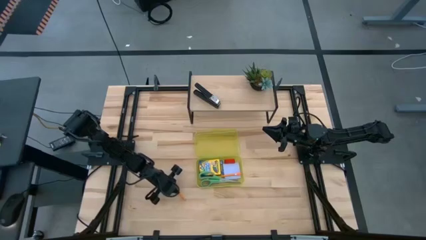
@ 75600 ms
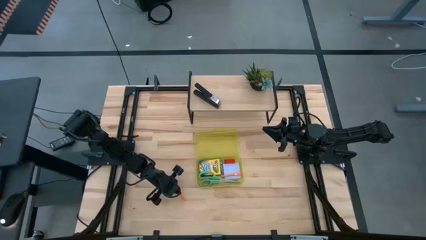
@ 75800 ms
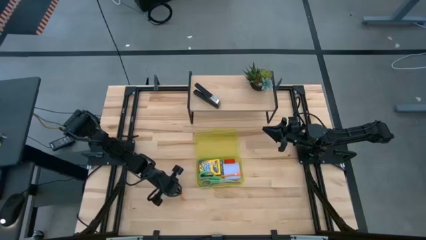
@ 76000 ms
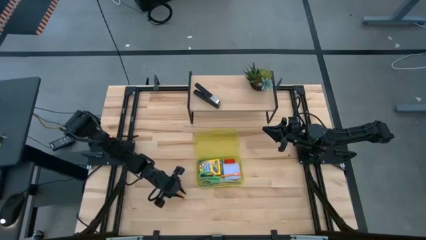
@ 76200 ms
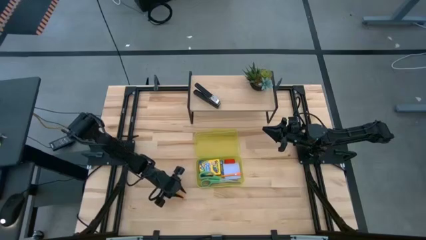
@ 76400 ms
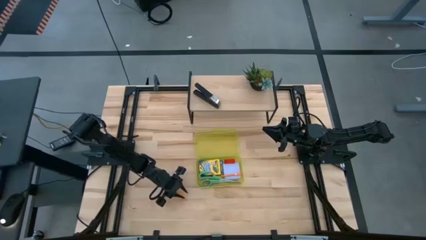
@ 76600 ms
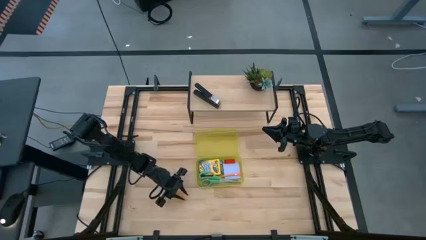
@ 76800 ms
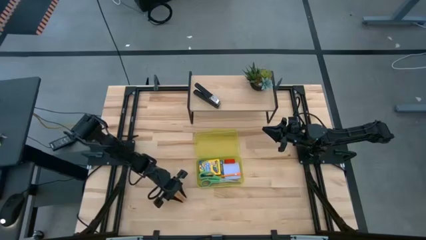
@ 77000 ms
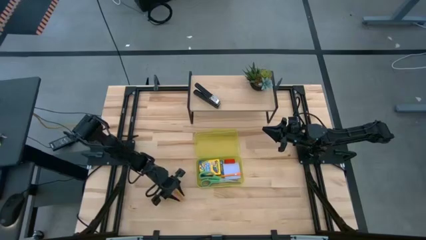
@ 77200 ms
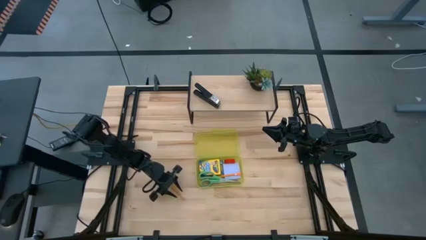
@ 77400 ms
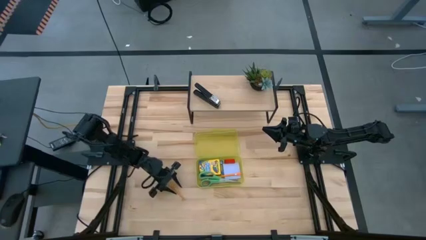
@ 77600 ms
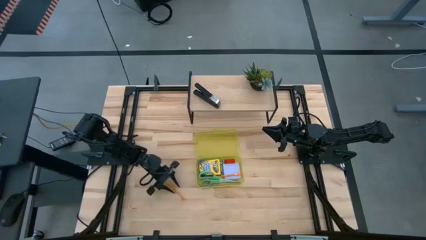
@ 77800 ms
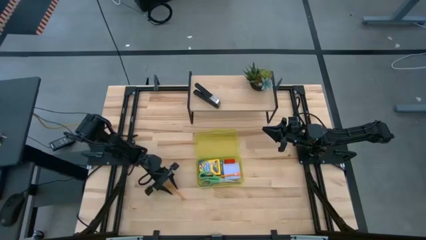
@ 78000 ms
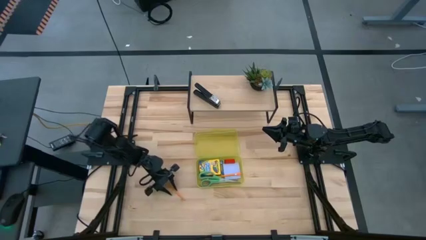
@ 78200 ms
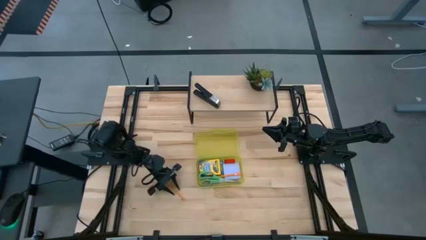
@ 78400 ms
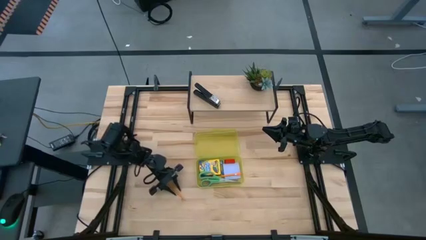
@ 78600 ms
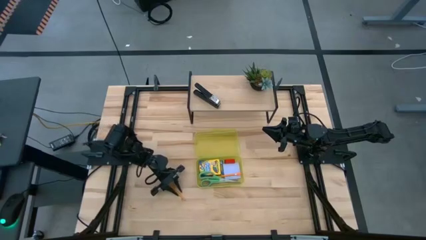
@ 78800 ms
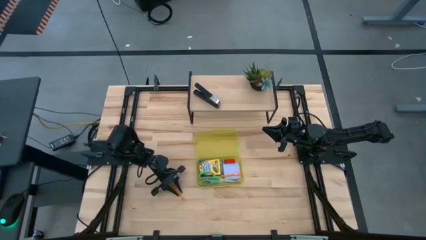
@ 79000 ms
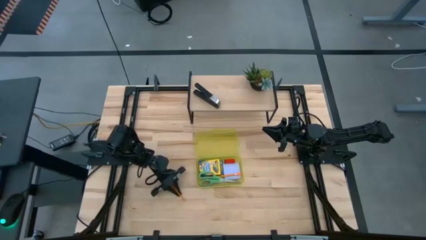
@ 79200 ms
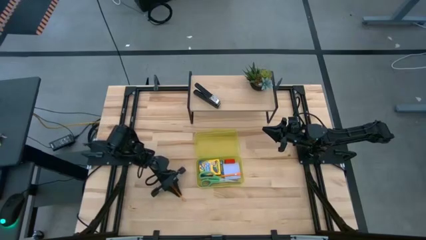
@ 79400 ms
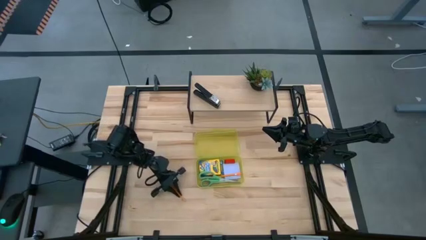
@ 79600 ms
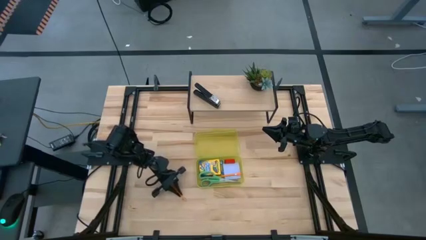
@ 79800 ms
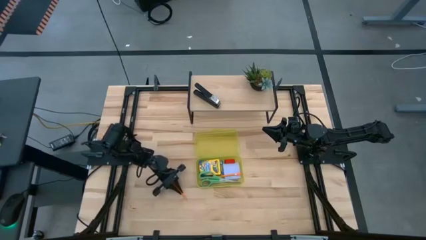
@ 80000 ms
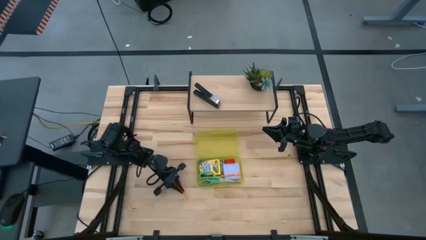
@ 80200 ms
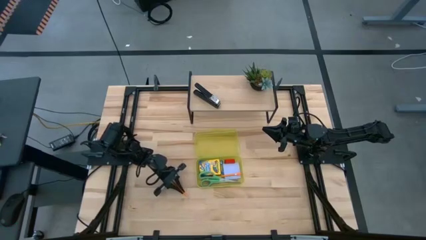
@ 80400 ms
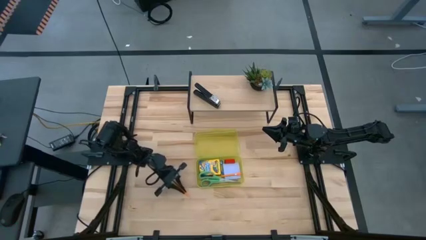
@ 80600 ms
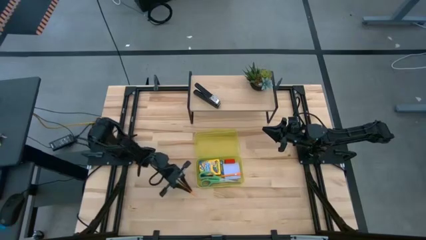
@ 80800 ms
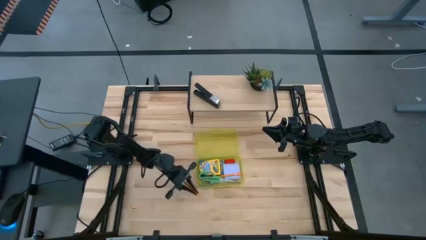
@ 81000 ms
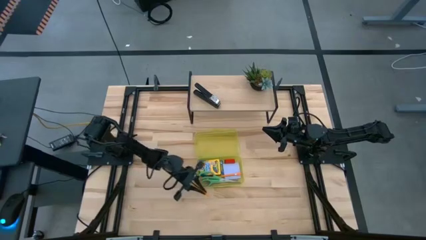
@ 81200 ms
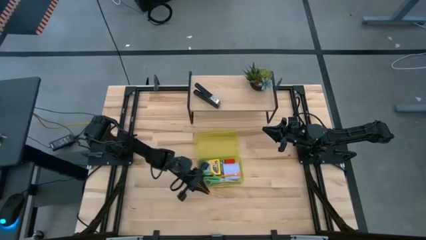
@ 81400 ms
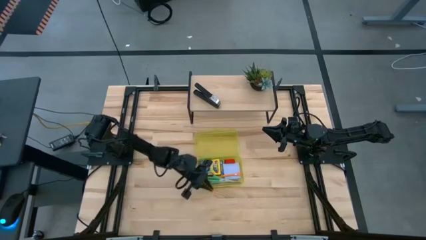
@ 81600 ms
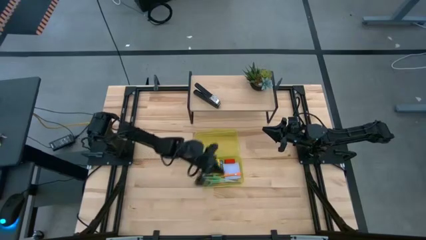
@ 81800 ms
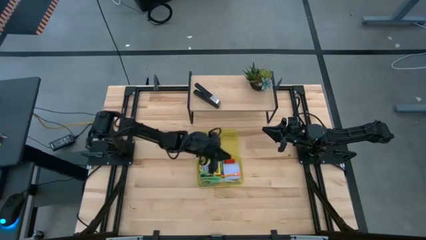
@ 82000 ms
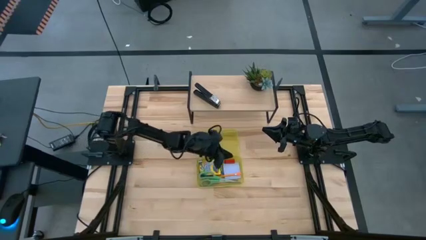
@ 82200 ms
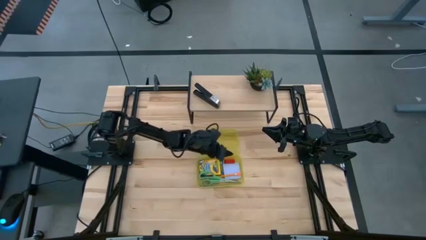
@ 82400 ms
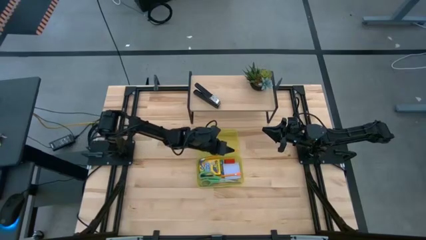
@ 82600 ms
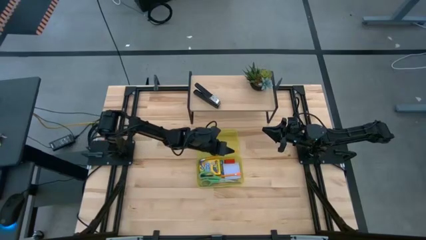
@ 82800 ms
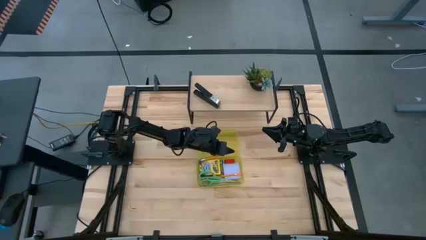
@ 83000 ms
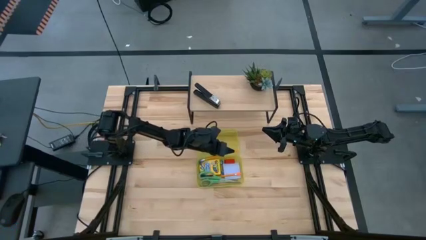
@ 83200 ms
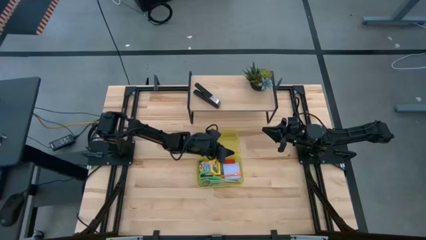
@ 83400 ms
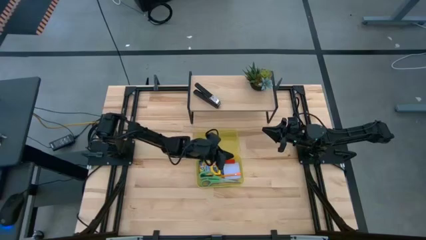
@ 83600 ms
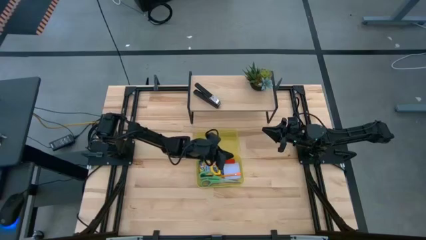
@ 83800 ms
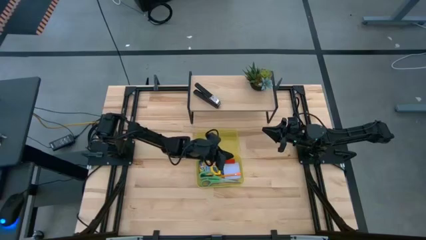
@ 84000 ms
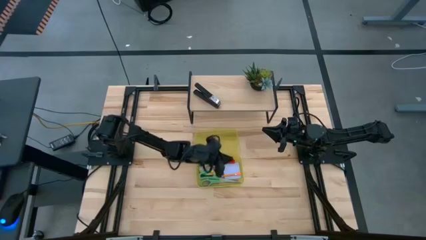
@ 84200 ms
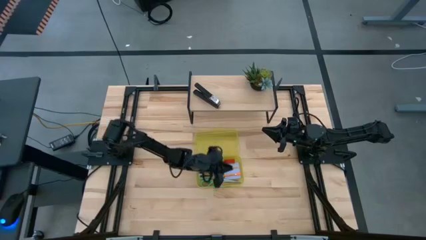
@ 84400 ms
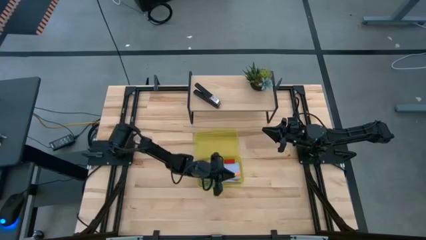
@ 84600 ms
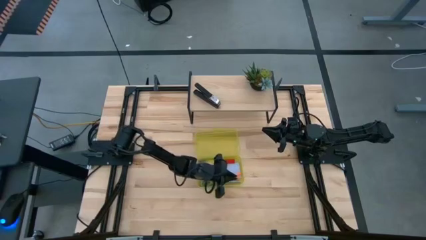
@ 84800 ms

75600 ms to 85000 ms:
Task: Pack school essentials
Put the yellow pencil into the yellow supply box

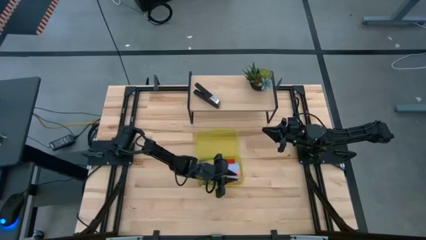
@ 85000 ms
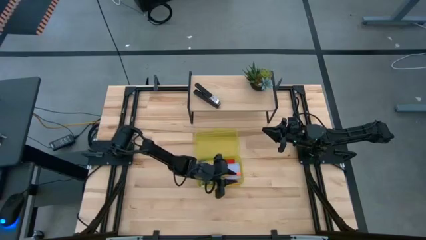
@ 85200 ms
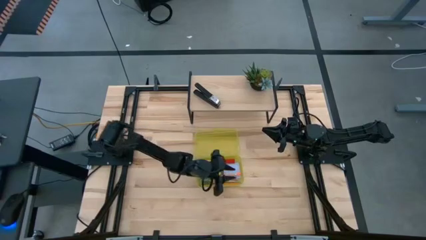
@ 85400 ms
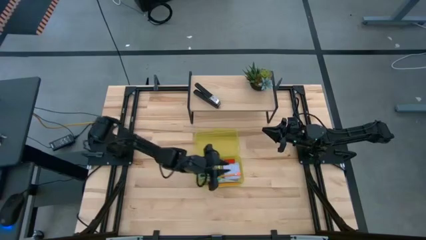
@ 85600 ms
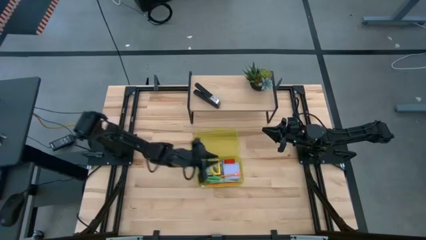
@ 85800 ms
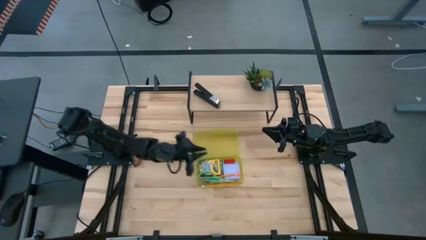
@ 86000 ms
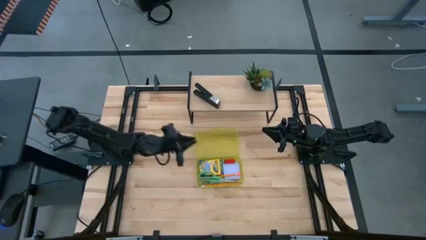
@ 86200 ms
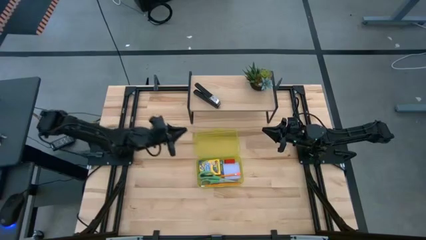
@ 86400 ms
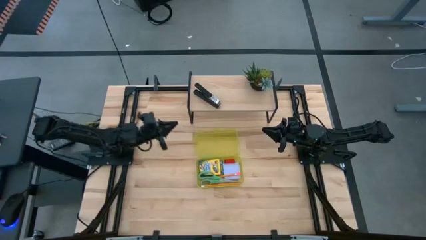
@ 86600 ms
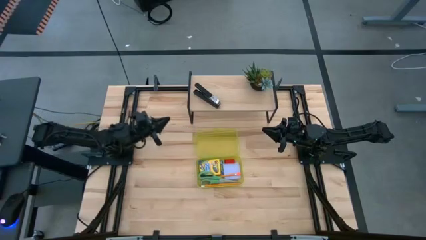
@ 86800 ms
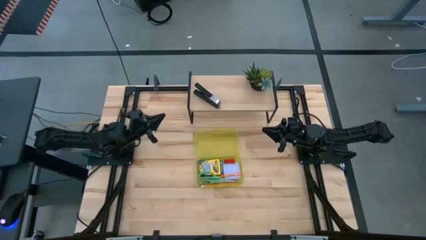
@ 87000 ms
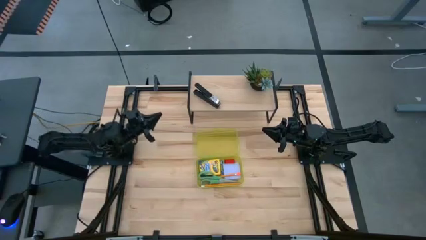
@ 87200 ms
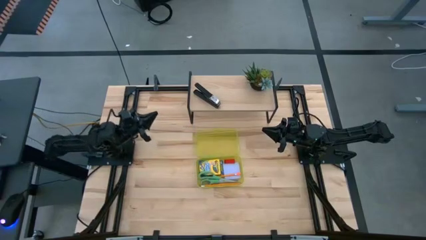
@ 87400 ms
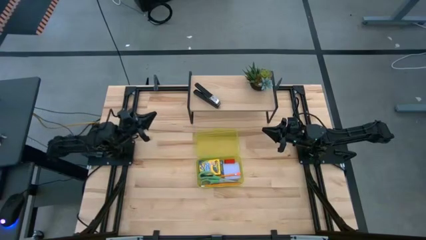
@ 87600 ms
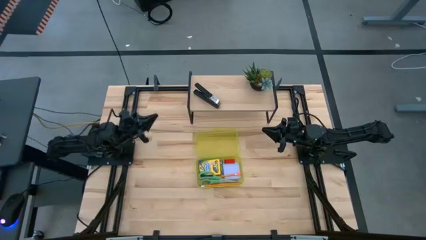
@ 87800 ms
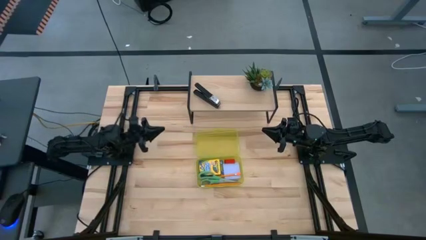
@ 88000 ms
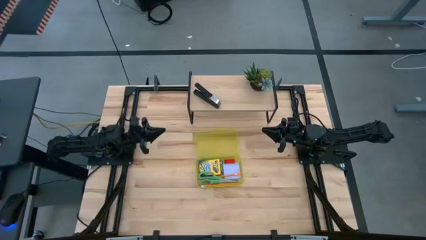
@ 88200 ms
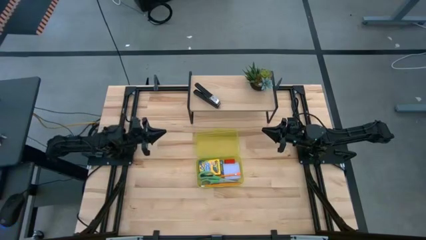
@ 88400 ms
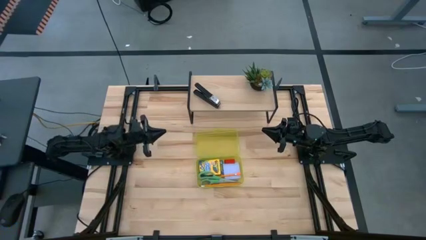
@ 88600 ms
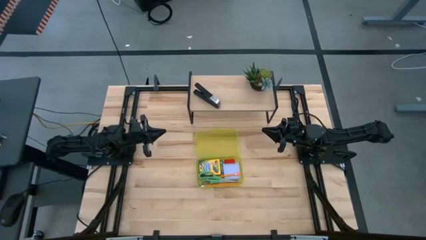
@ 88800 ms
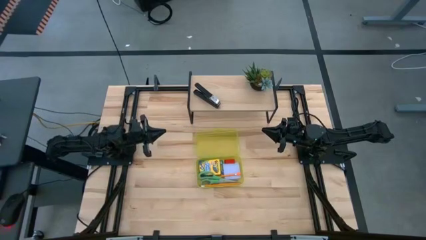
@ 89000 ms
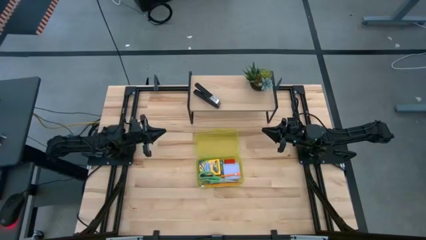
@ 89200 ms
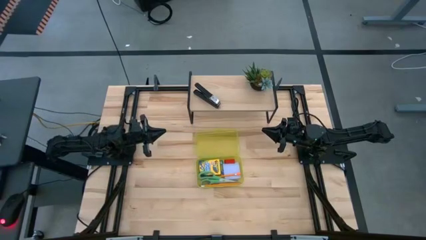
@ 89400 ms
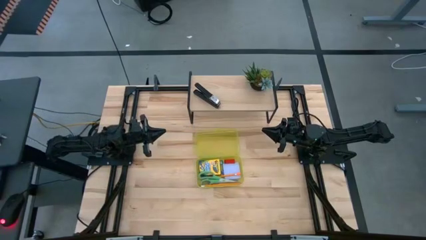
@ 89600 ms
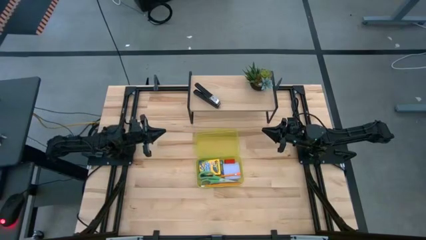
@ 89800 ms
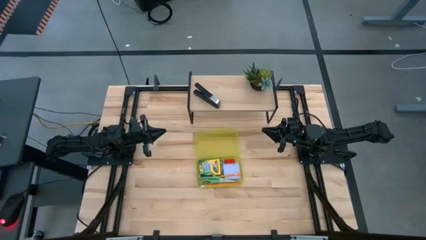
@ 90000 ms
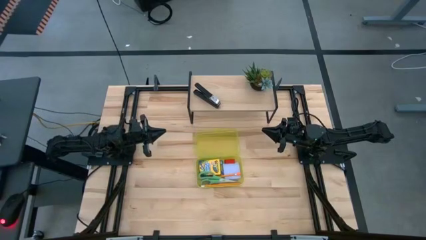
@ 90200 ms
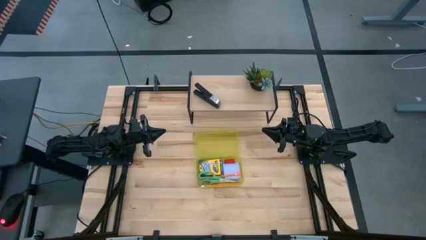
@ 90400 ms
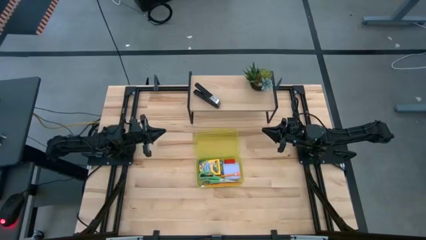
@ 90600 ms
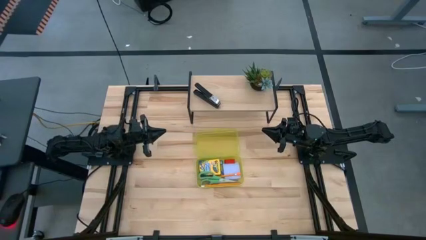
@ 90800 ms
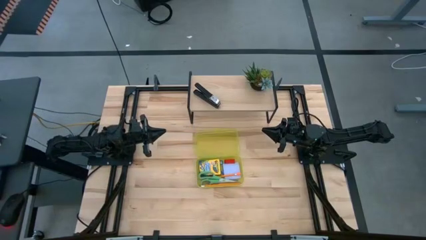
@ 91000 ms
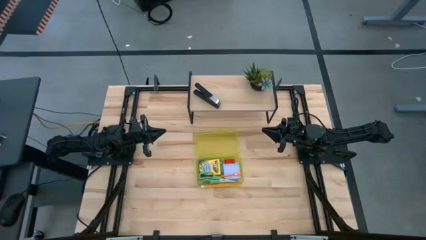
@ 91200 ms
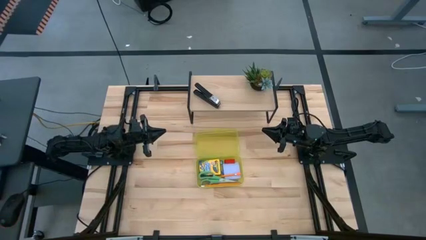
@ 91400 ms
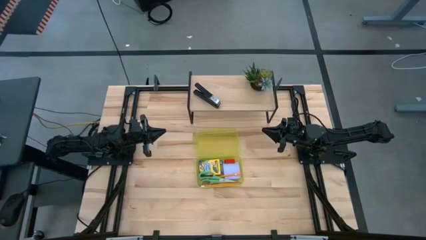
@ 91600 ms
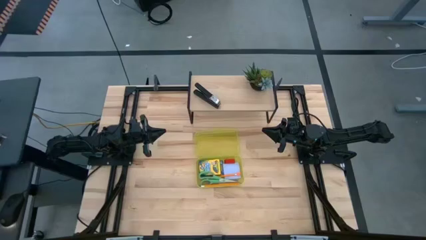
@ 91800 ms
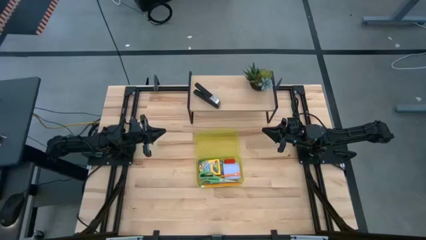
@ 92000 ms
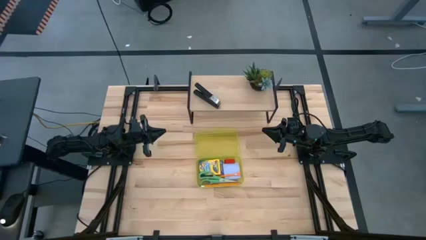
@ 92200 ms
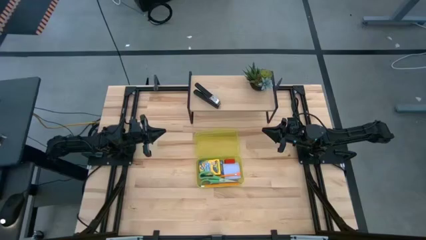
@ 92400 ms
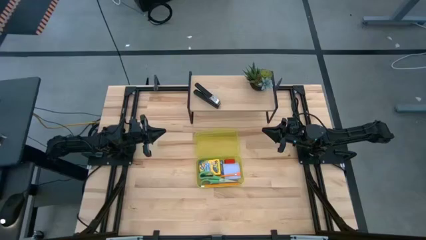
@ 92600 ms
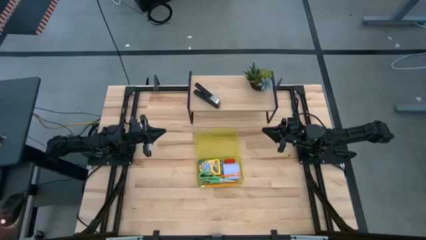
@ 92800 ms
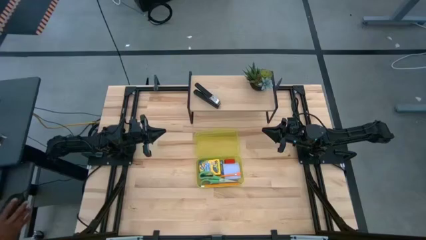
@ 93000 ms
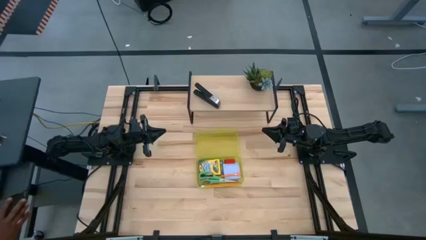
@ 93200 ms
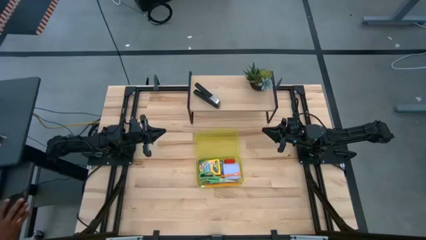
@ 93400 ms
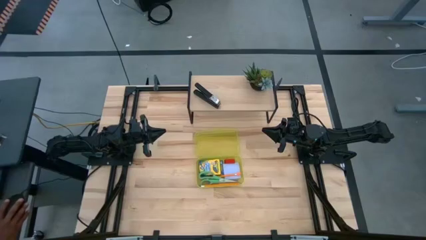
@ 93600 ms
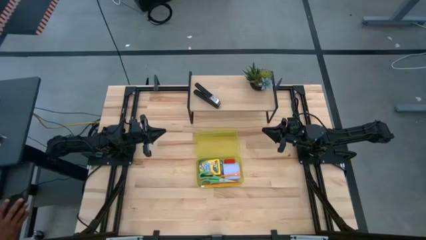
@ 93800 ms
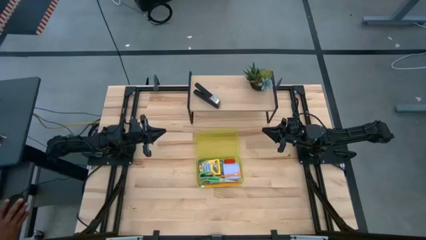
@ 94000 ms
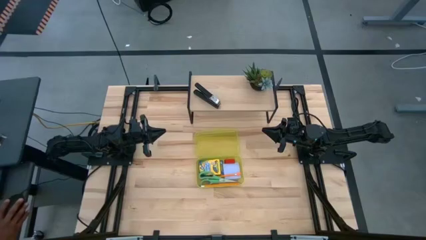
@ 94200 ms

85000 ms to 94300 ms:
Return to Home Position
